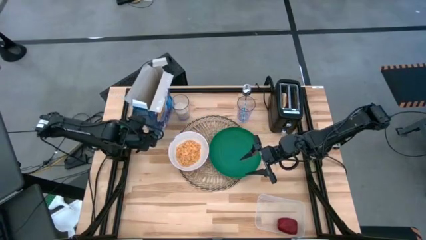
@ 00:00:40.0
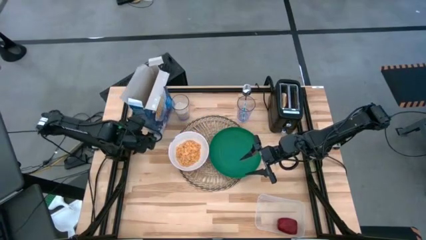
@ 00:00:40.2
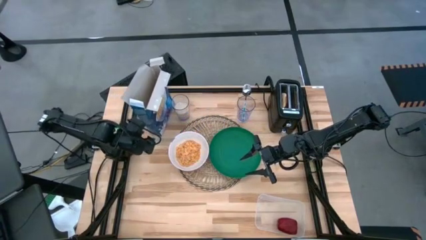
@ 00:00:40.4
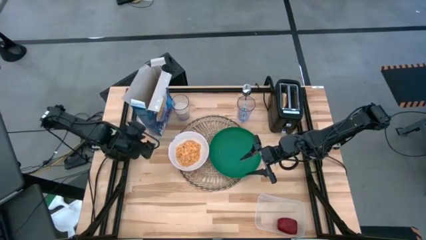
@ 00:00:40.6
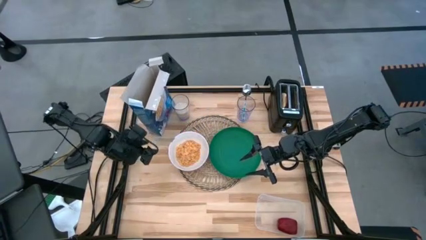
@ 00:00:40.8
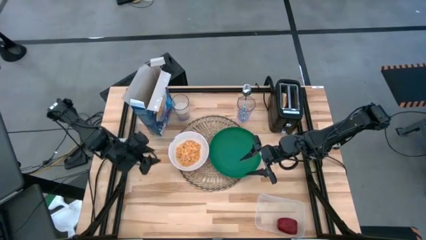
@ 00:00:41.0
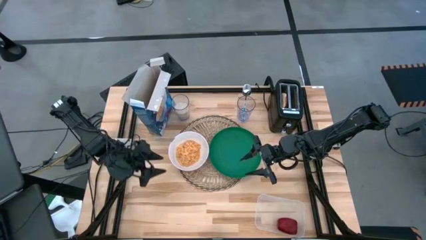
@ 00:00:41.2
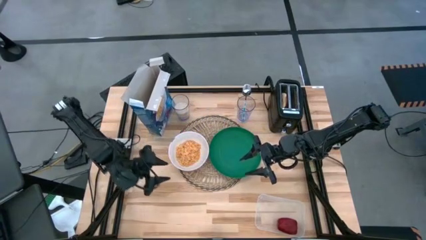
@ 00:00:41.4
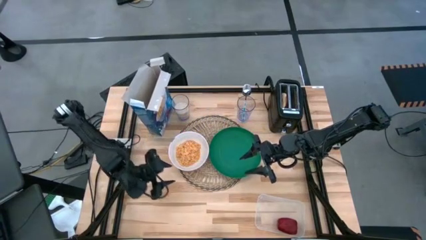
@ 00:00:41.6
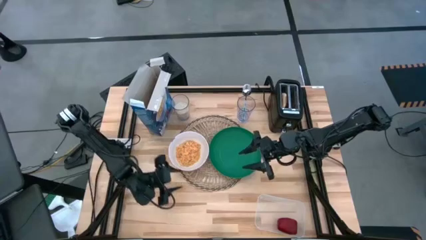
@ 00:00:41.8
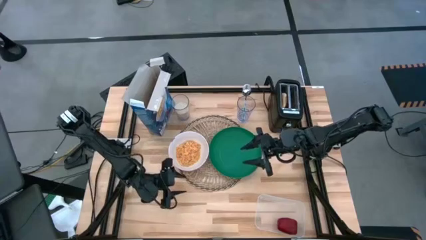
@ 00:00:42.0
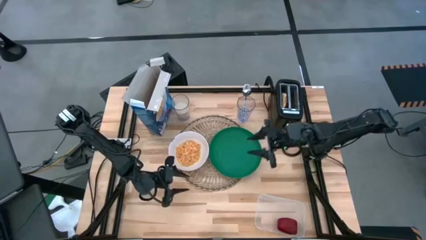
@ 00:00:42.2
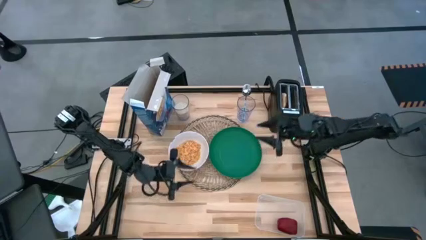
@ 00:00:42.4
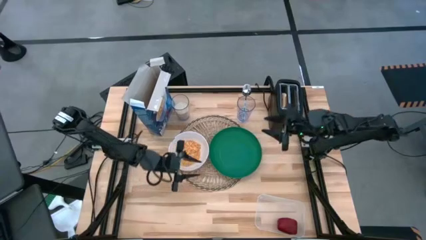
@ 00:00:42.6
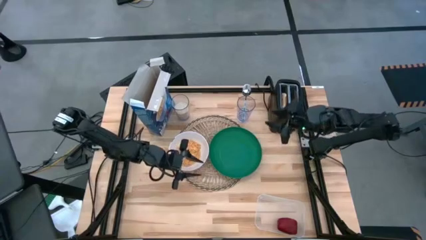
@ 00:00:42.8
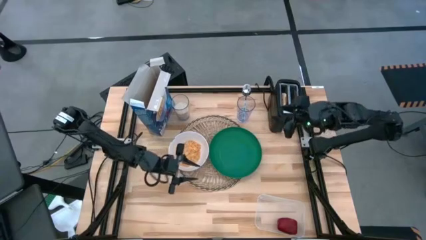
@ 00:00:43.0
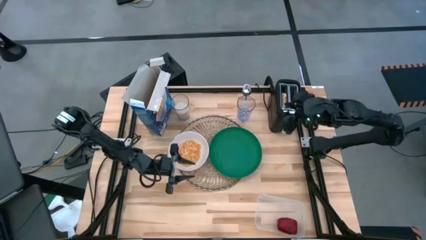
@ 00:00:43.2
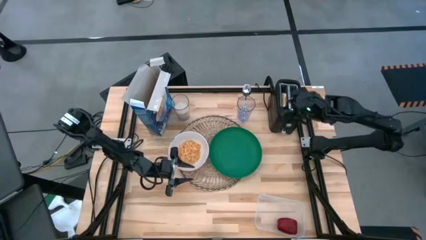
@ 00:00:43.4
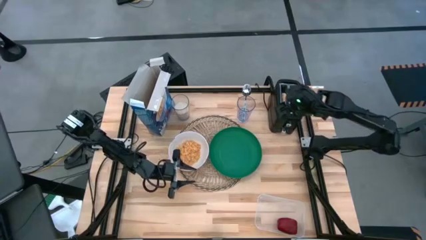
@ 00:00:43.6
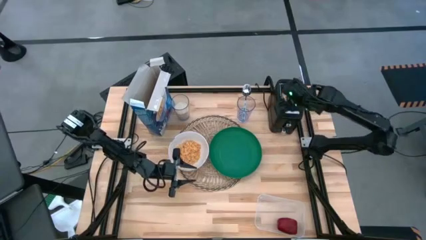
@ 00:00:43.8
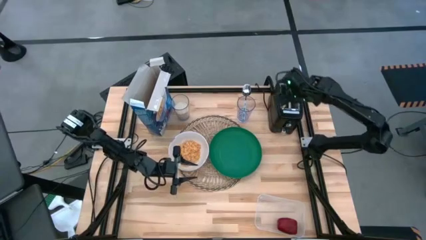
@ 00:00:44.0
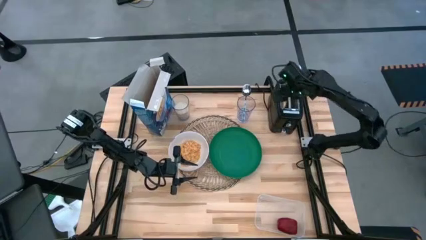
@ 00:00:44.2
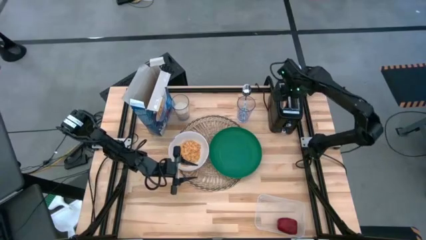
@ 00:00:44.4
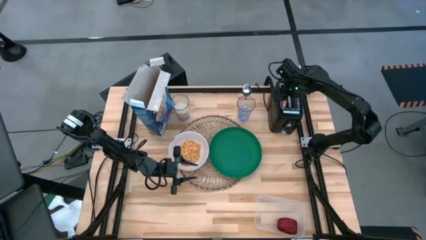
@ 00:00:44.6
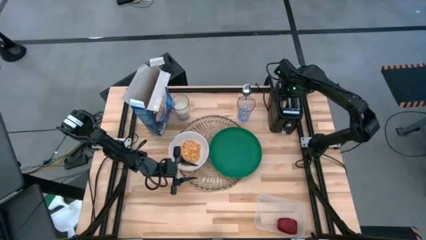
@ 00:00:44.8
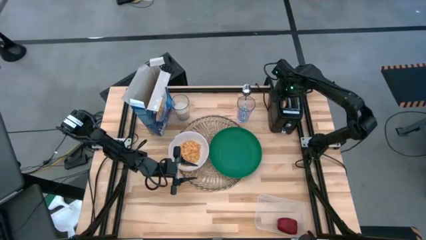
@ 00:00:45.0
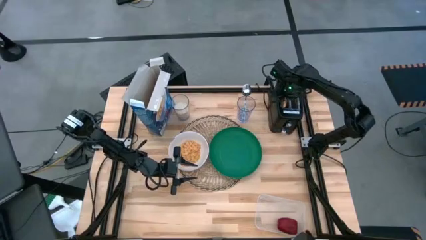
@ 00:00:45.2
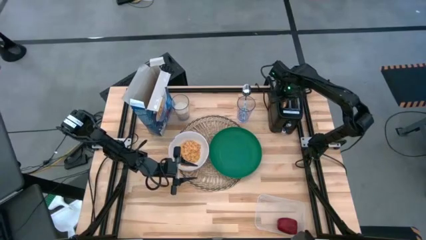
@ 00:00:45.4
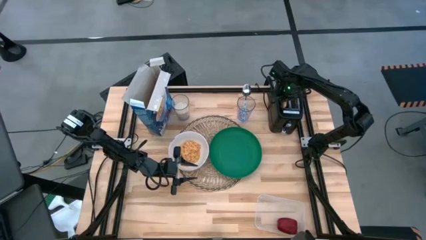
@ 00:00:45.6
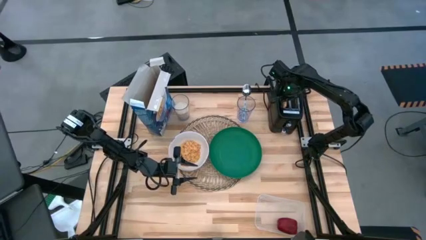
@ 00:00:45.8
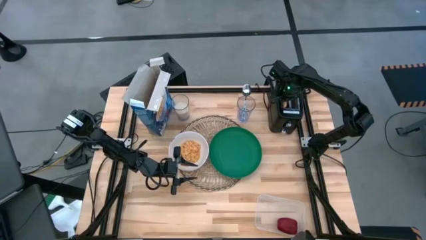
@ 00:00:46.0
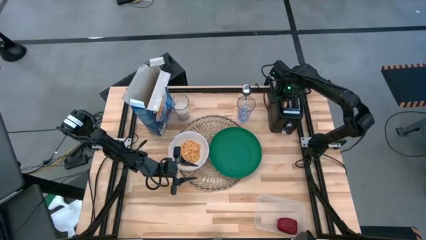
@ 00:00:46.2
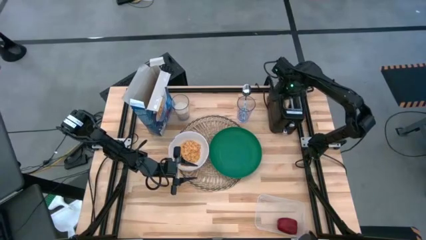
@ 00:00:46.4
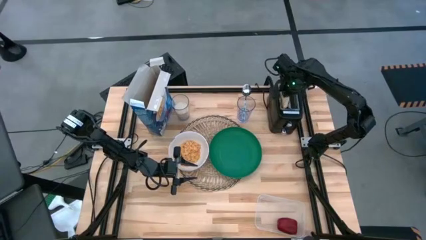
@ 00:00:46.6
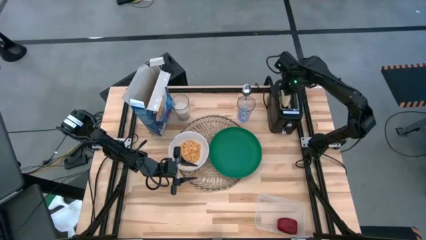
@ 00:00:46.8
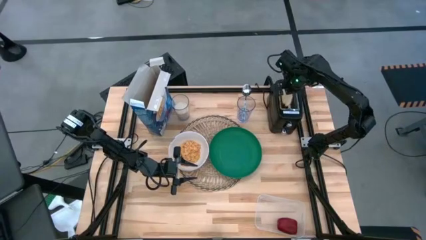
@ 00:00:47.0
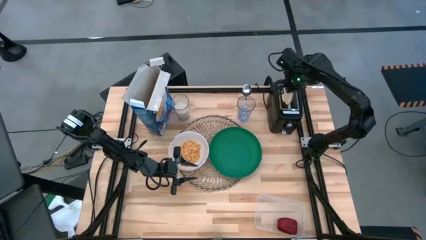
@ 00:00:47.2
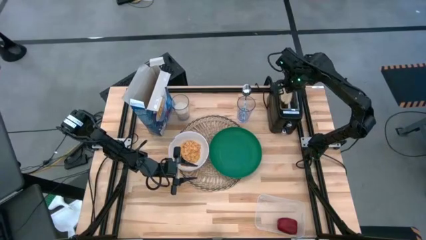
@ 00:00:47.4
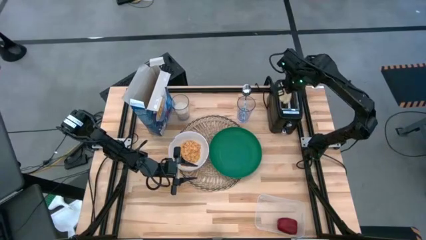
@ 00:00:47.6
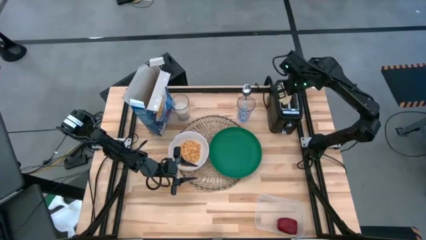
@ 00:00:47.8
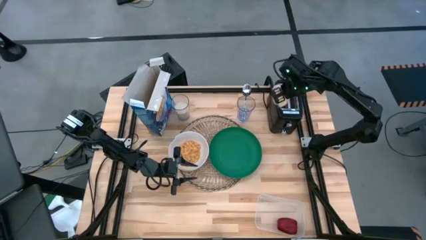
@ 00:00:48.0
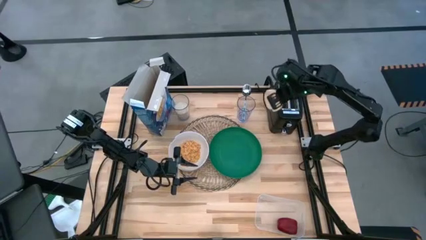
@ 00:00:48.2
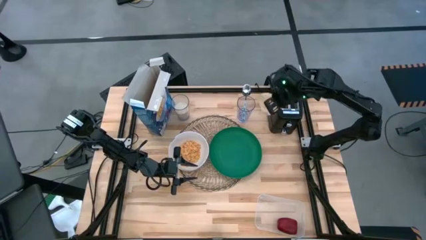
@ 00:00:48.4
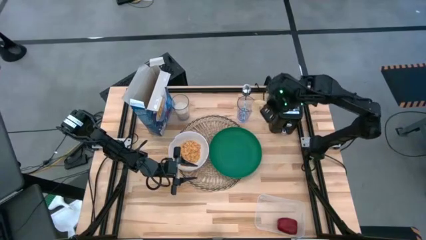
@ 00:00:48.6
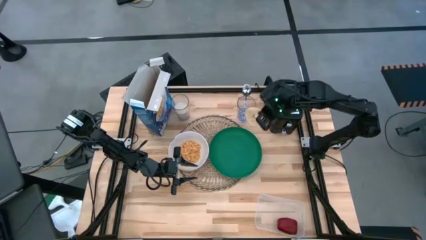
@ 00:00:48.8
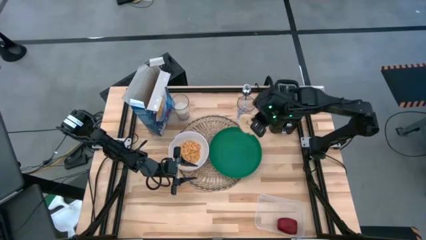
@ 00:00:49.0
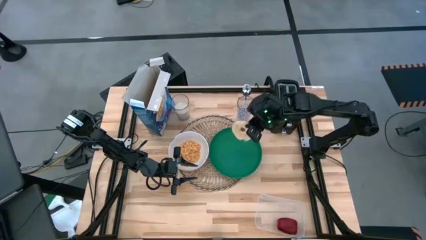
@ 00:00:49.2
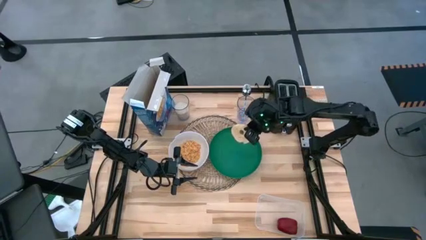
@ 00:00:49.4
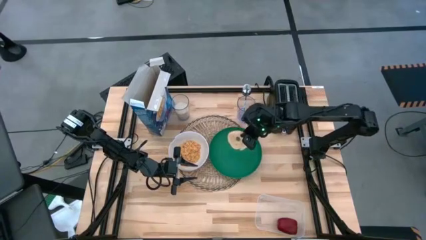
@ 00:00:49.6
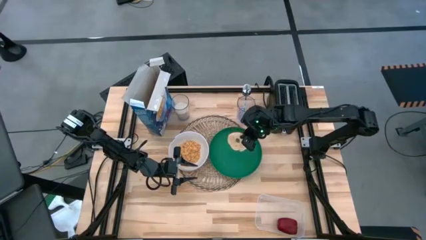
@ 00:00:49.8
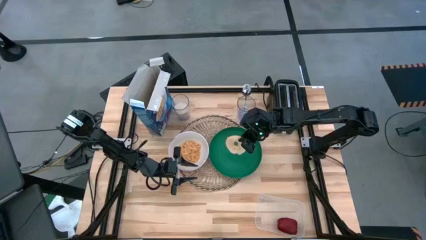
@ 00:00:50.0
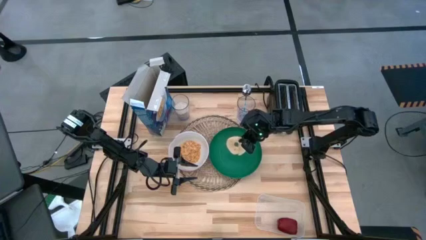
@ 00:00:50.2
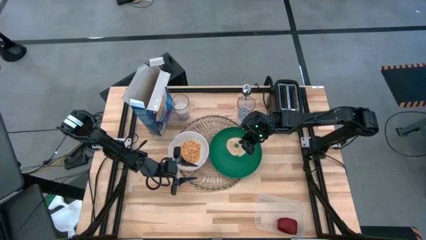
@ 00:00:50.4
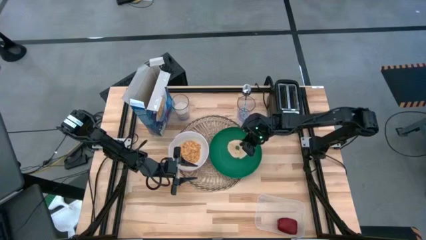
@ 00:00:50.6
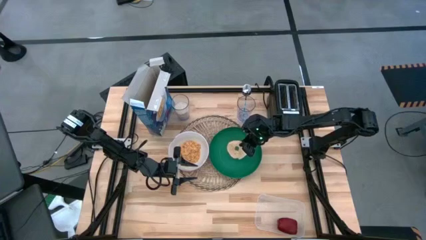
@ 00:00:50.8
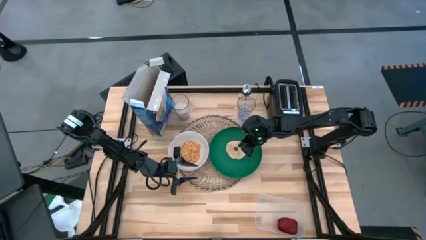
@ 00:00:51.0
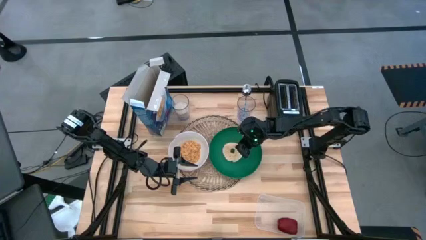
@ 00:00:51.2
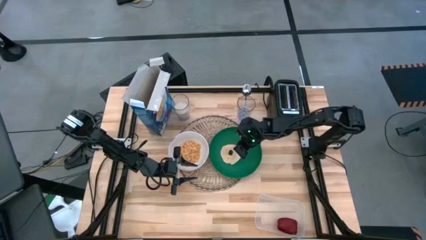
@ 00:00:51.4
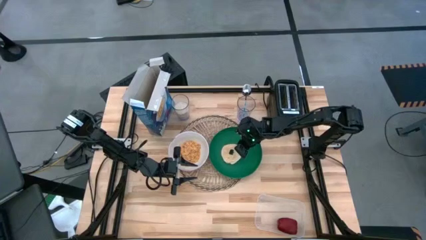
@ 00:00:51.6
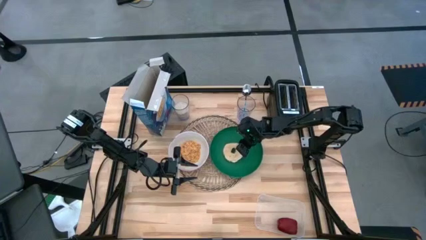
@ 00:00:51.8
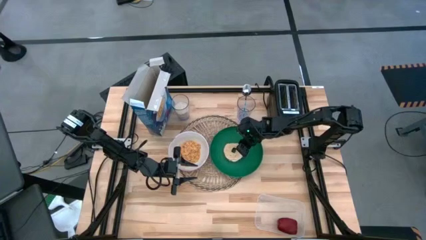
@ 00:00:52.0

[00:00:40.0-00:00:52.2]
Task: Arrange a breakfast setting
Put the toasted bagel on the green plate

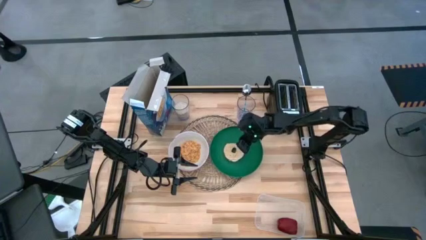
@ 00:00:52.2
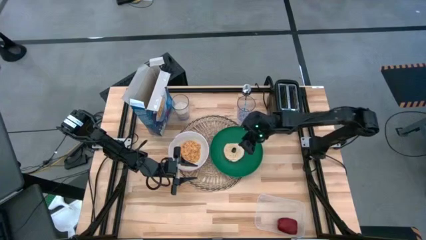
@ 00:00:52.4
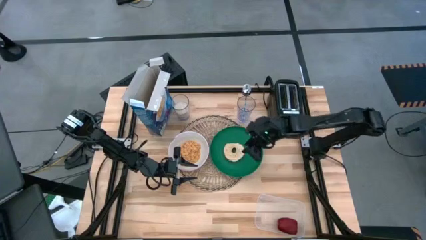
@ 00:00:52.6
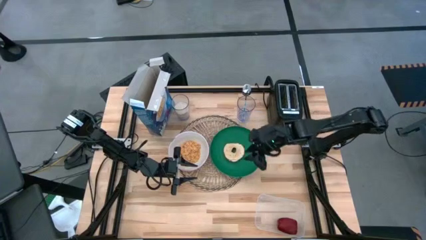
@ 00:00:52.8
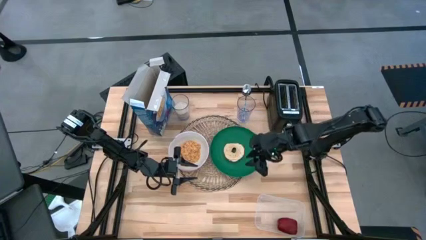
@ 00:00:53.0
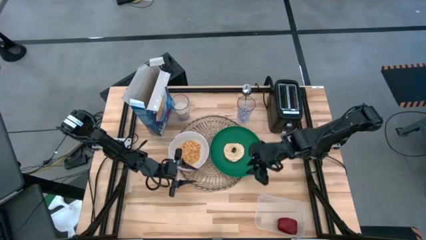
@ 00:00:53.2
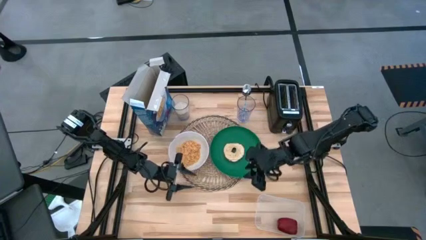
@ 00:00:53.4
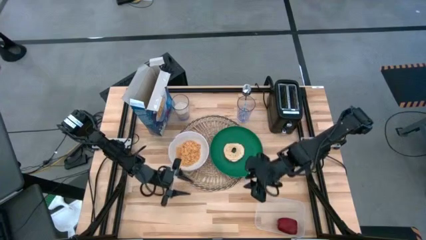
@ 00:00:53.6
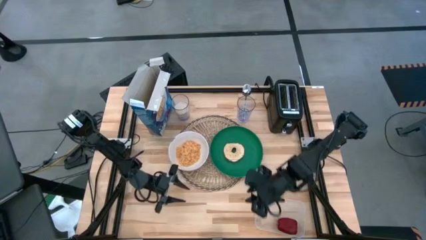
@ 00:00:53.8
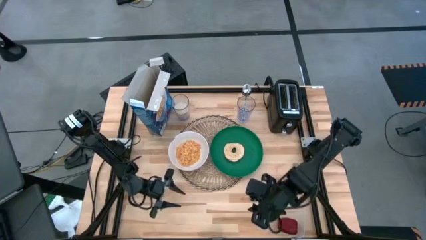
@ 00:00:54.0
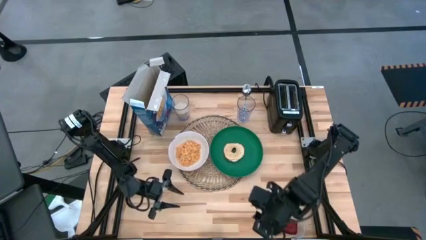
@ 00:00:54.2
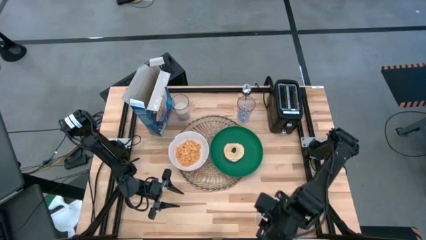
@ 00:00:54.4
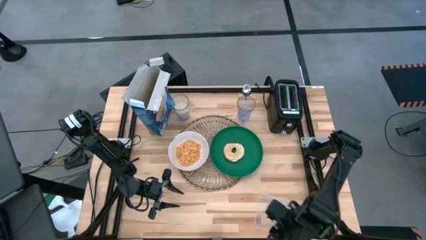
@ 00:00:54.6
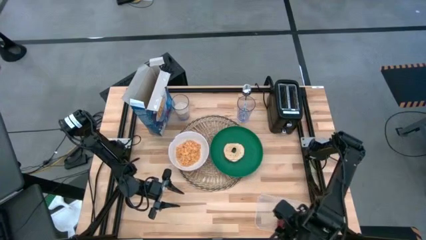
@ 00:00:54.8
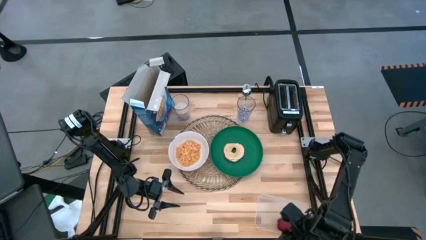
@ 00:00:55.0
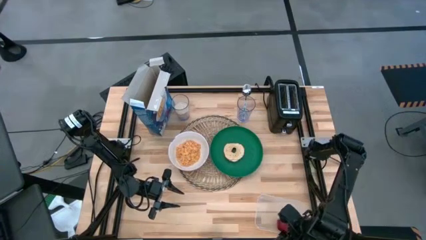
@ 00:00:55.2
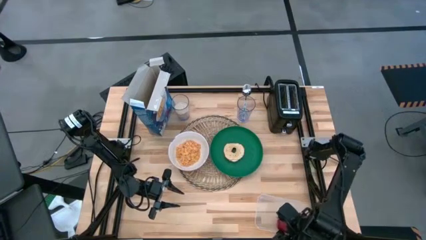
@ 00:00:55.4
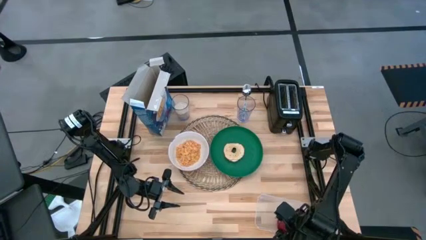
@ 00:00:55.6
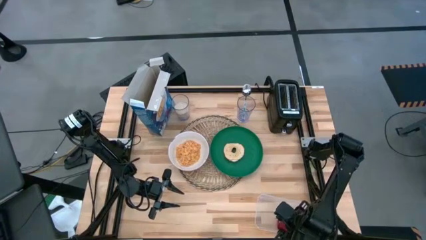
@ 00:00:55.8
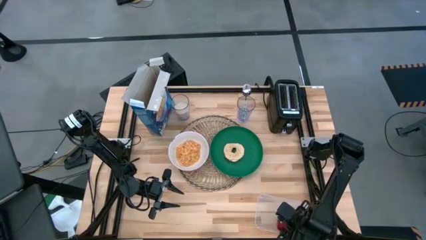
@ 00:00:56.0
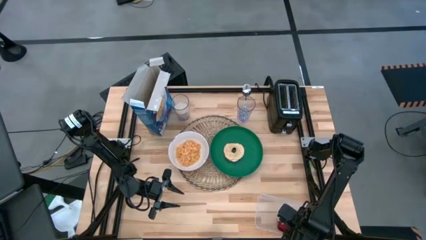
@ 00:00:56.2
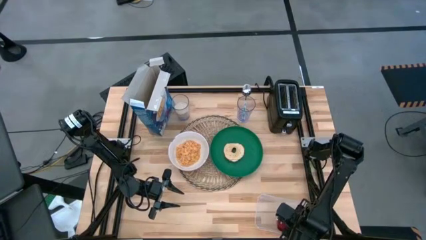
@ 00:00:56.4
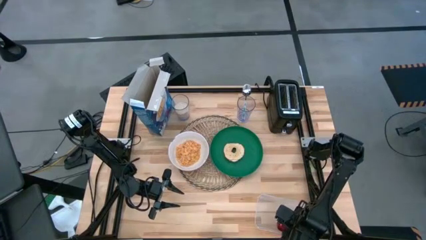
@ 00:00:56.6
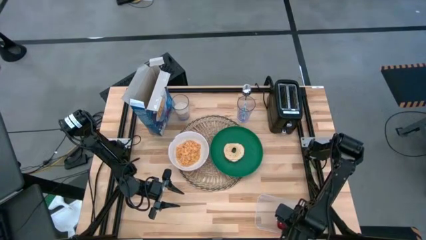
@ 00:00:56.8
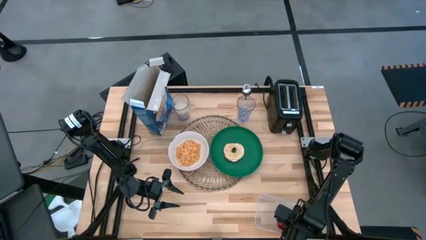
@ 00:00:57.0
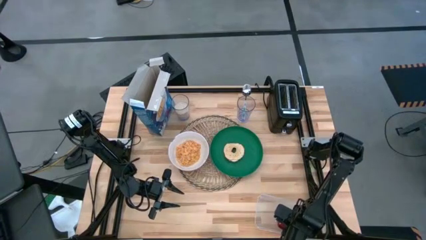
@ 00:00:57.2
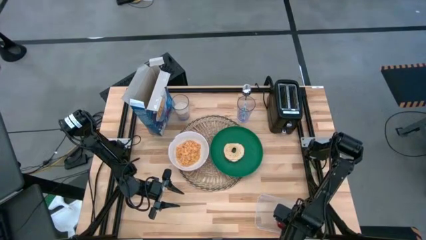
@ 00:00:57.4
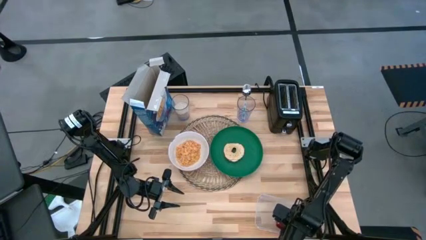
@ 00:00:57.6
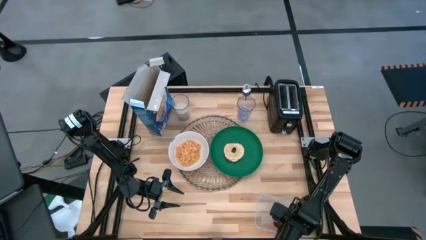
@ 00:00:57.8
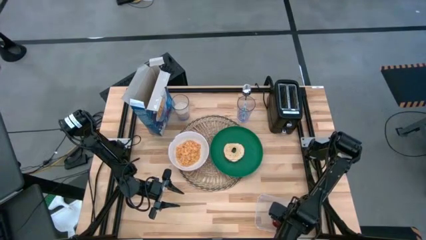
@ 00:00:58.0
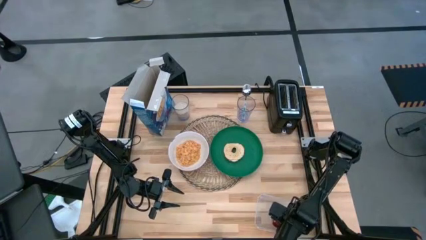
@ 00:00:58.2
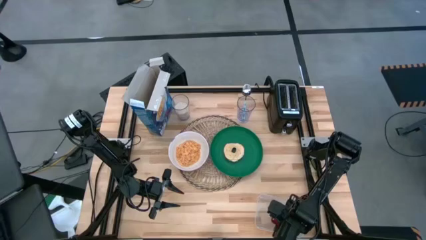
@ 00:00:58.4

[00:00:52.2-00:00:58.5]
Put the apple on top of the brown placemat
